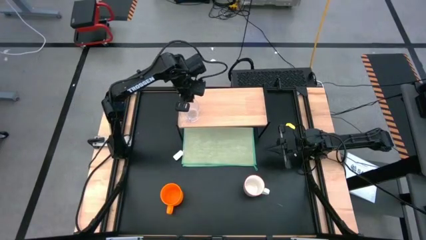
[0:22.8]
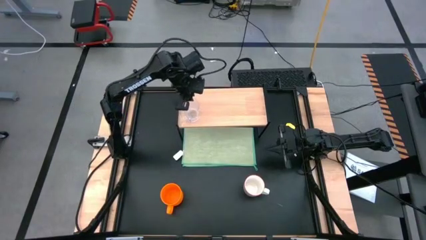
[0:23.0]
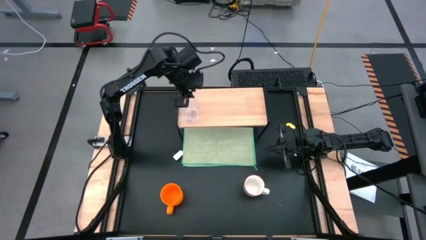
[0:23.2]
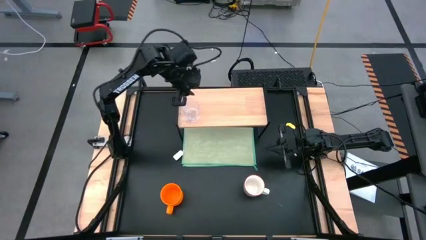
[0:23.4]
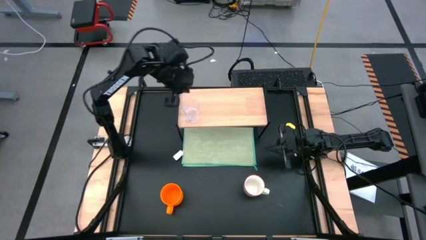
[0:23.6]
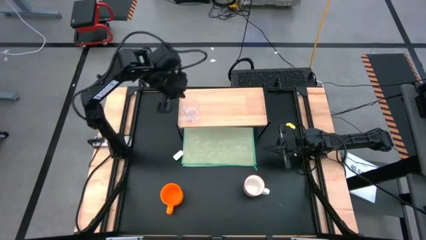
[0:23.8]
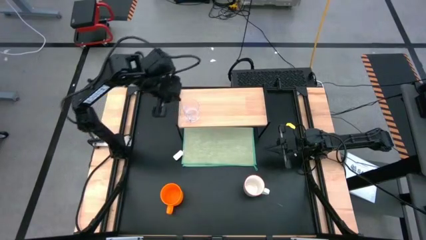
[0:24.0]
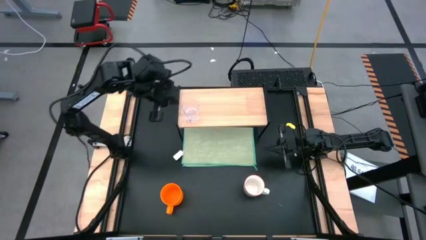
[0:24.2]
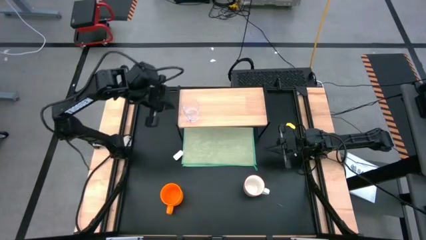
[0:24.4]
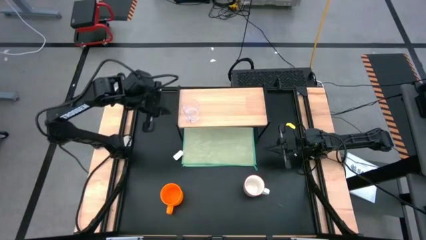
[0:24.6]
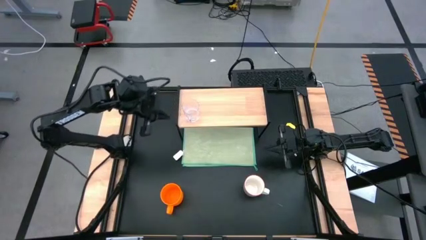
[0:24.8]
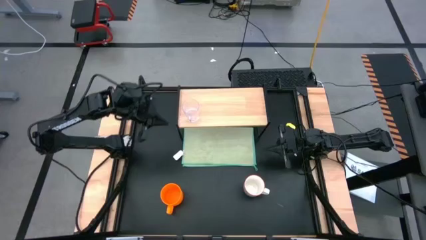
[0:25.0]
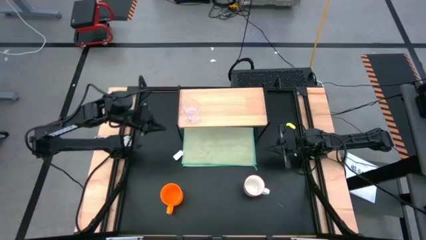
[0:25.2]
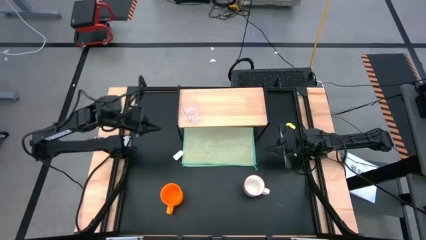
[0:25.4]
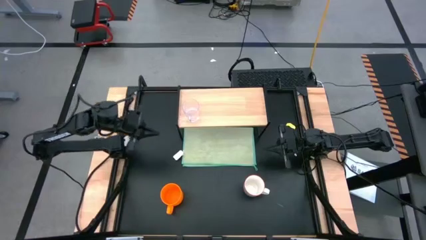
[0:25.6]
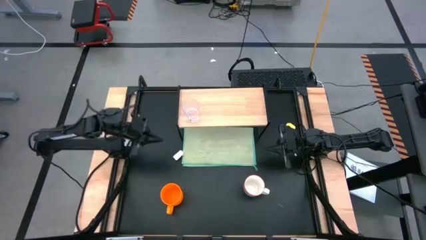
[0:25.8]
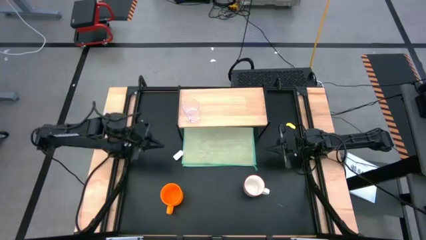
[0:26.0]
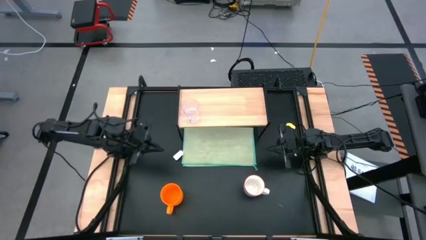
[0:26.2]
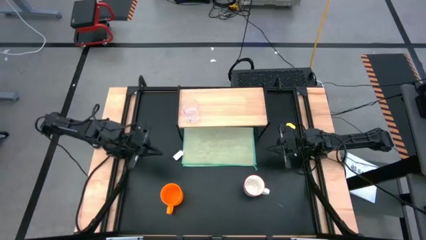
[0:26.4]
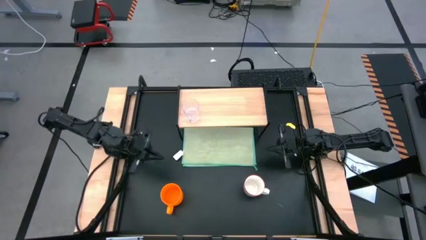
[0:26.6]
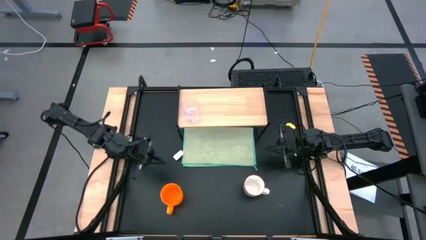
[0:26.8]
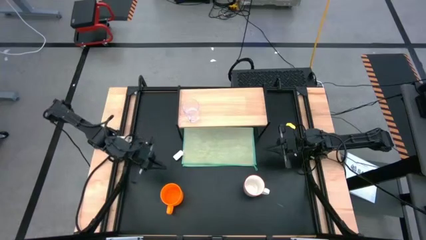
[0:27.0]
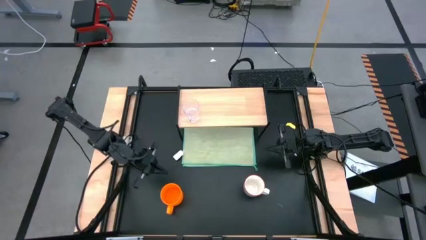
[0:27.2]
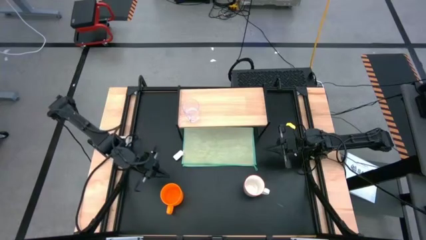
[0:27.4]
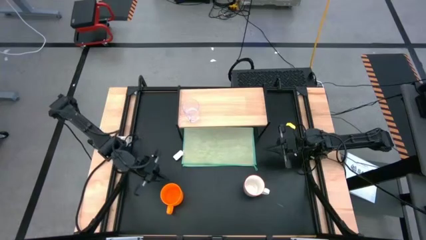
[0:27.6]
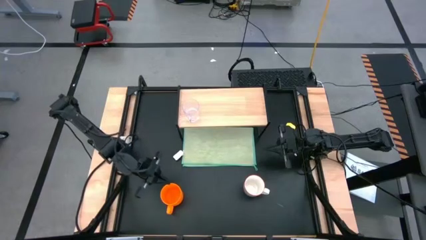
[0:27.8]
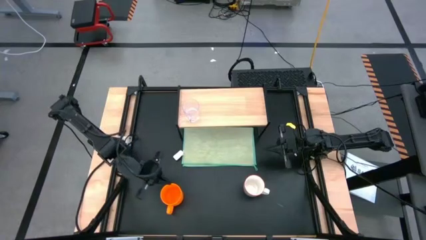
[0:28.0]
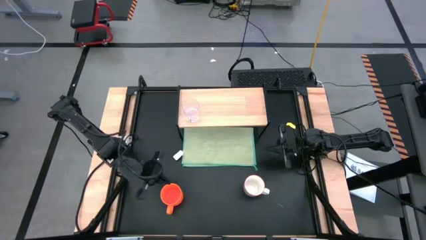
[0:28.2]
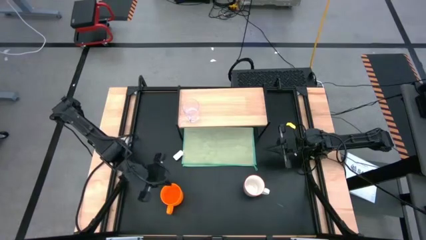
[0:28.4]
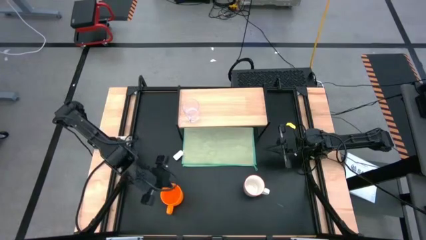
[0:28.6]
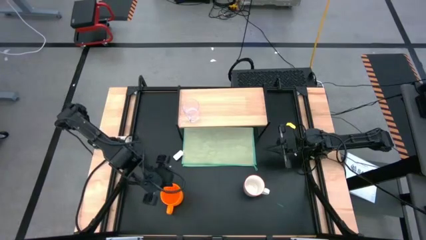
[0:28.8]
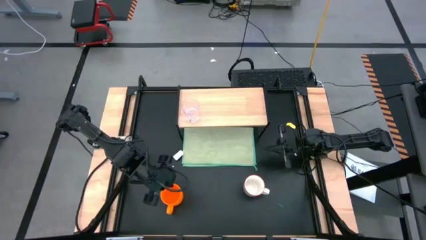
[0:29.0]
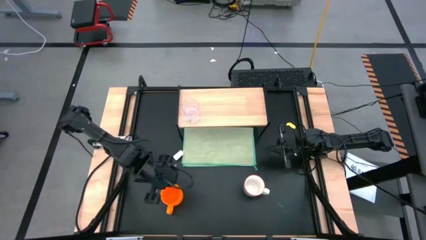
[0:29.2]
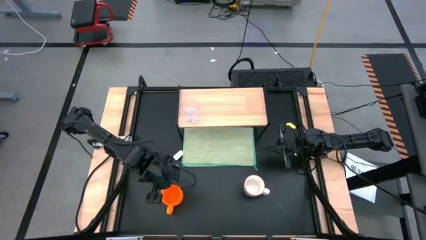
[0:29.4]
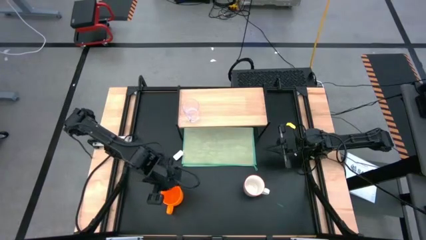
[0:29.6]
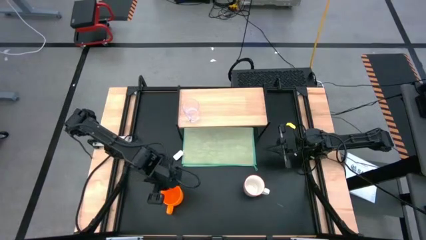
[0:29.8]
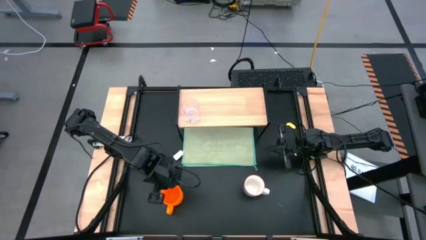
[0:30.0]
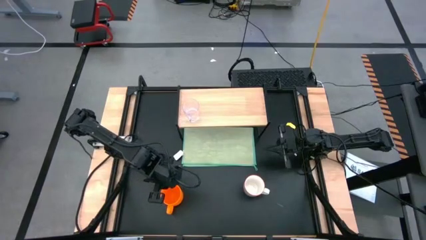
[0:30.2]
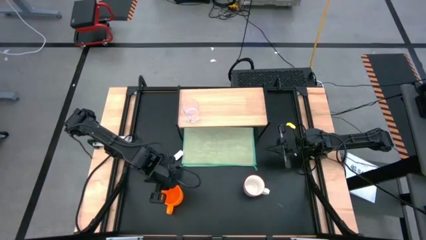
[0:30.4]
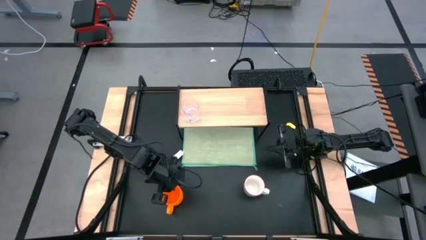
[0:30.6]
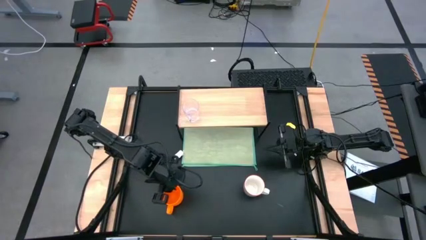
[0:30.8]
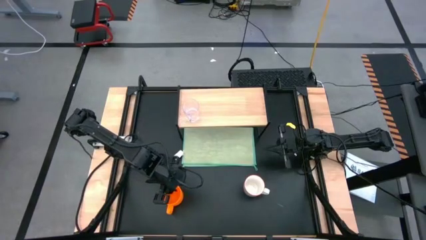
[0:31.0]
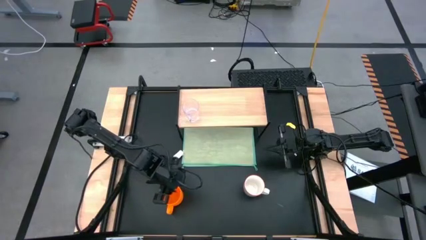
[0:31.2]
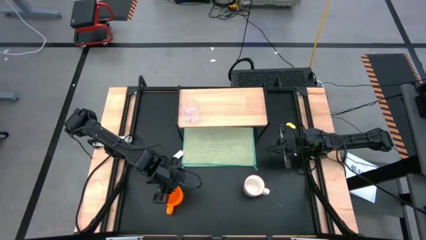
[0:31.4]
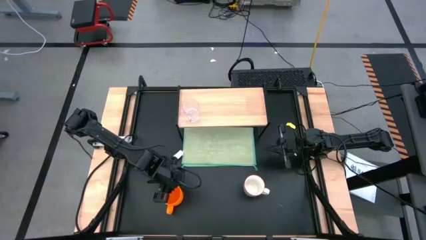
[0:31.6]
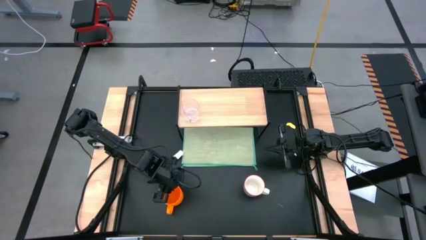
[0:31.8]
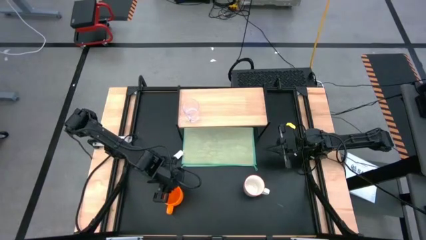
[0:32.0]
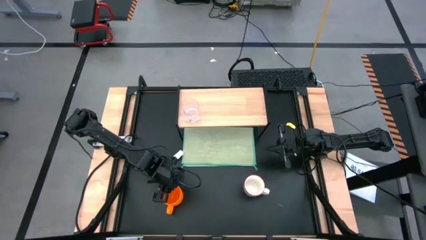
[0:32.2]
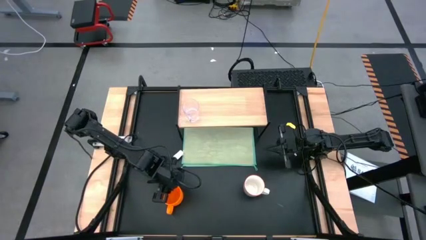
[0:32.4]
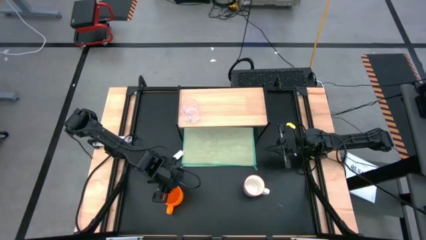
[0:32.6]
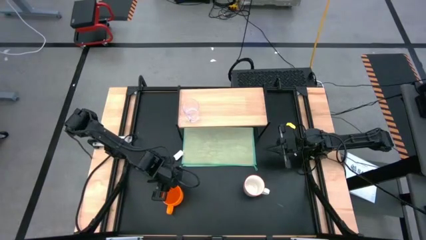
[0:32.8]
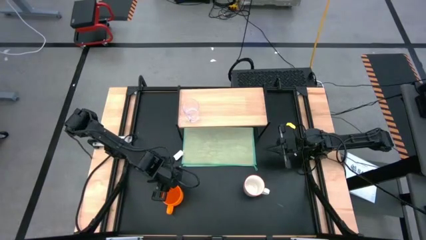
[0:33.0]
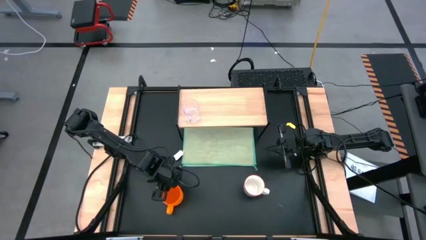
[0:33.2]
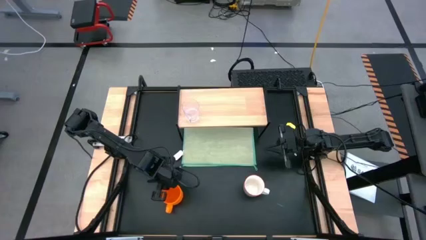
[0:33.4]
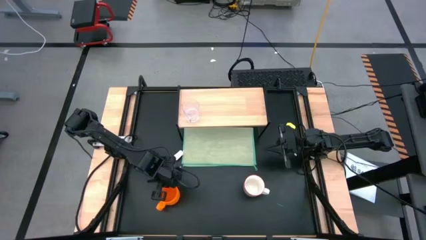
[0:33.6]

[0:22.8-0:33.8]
Task: Stack small to large cups/mugs on shelf
Put the orange mug on the shelf
